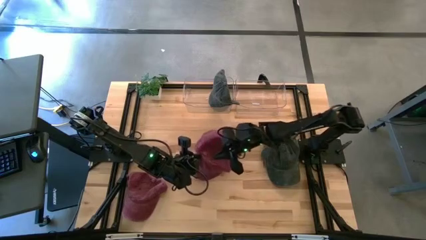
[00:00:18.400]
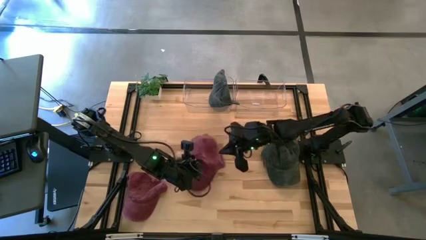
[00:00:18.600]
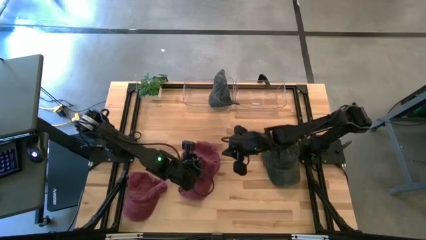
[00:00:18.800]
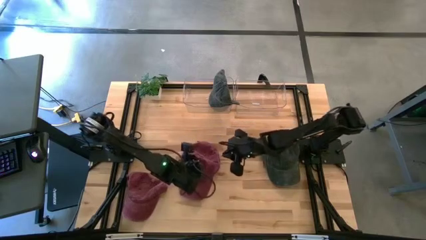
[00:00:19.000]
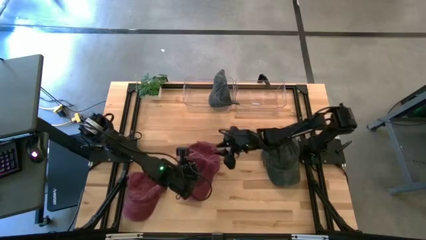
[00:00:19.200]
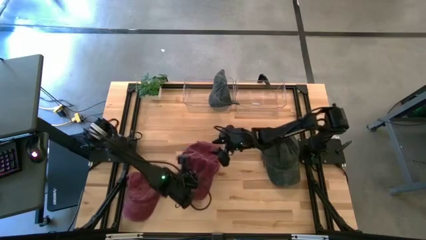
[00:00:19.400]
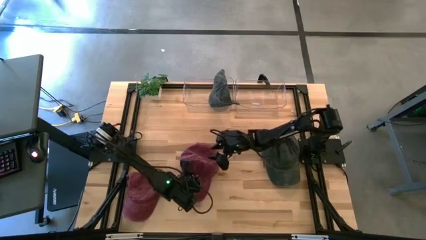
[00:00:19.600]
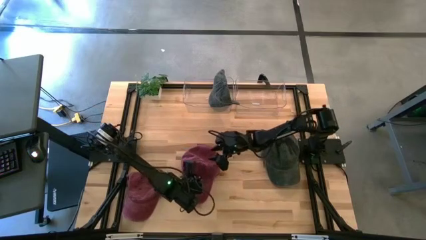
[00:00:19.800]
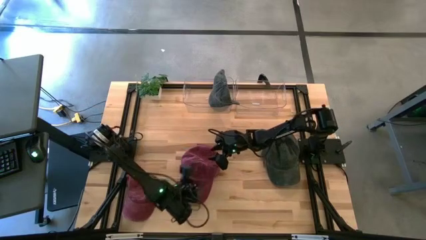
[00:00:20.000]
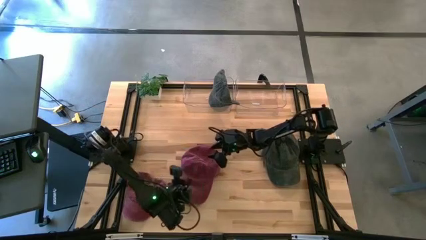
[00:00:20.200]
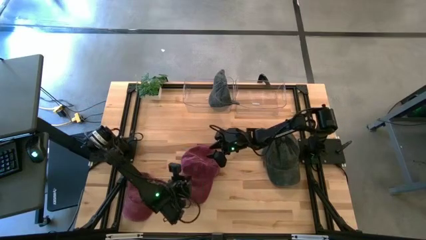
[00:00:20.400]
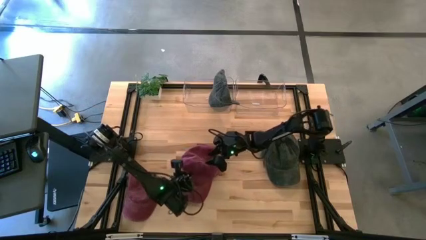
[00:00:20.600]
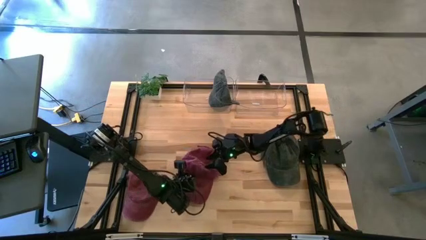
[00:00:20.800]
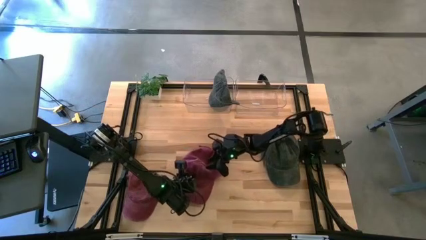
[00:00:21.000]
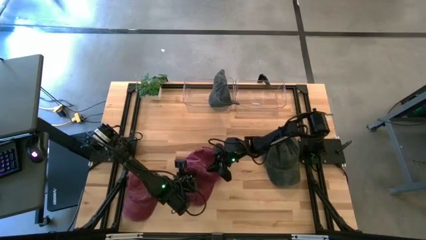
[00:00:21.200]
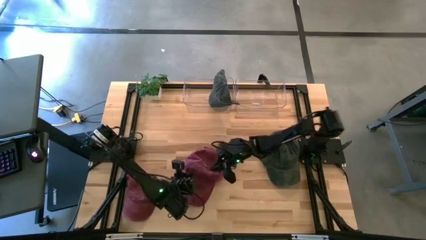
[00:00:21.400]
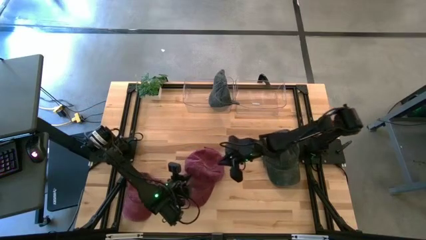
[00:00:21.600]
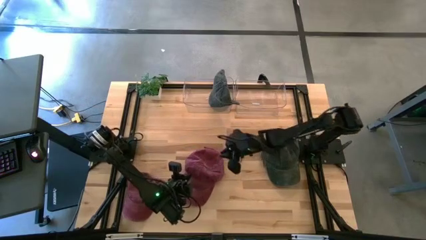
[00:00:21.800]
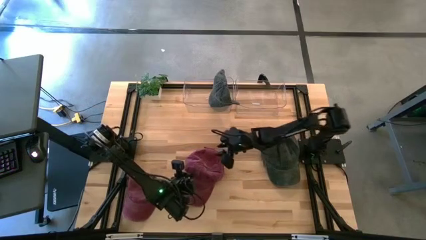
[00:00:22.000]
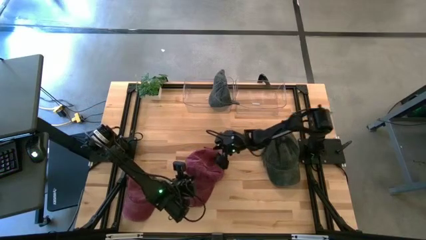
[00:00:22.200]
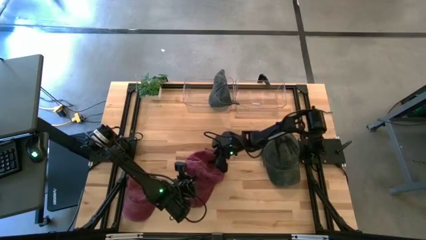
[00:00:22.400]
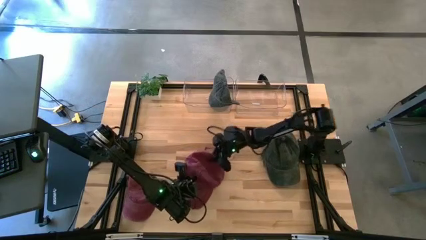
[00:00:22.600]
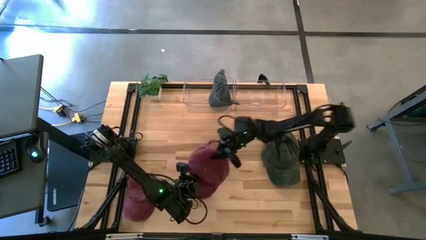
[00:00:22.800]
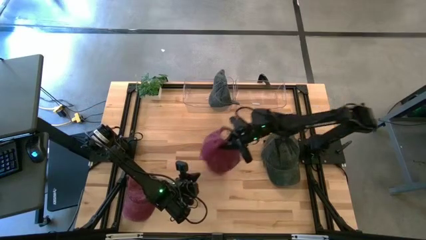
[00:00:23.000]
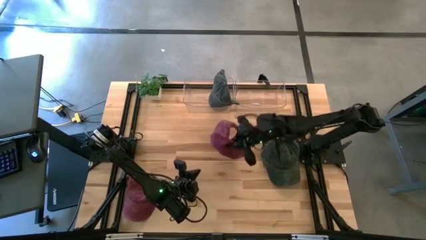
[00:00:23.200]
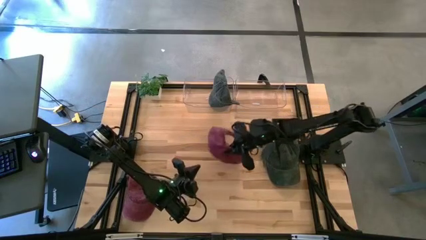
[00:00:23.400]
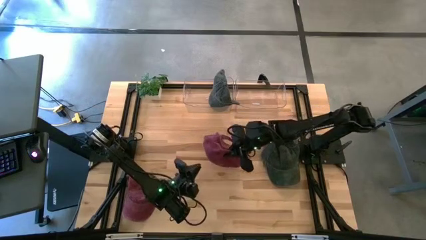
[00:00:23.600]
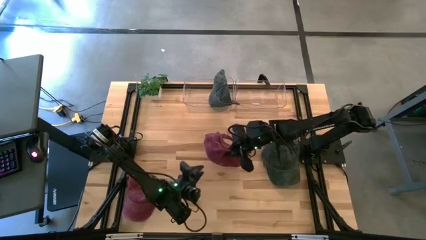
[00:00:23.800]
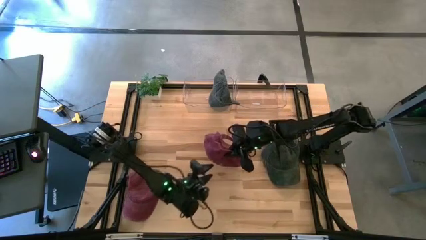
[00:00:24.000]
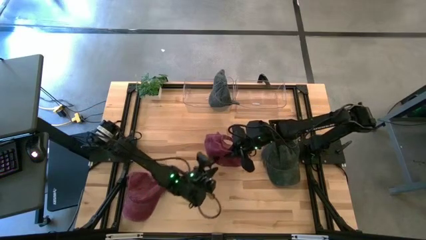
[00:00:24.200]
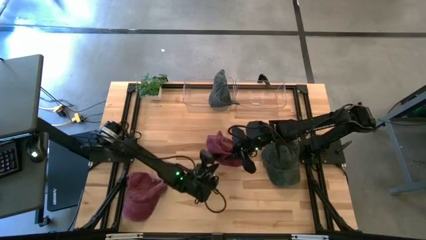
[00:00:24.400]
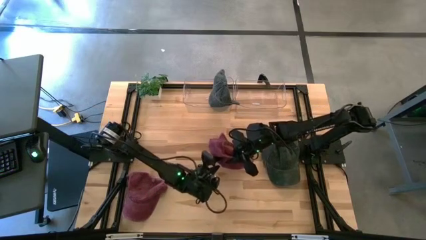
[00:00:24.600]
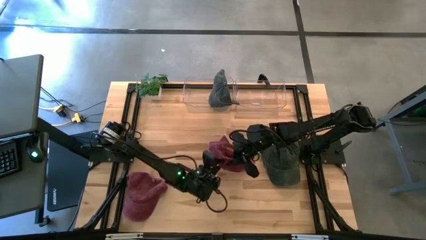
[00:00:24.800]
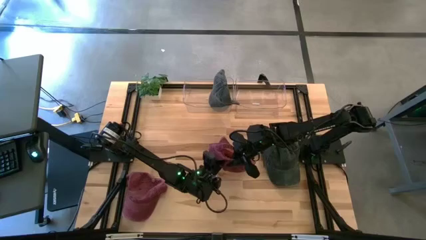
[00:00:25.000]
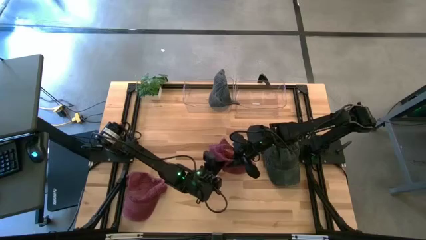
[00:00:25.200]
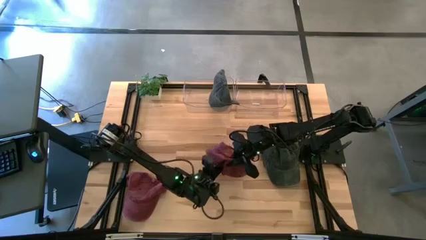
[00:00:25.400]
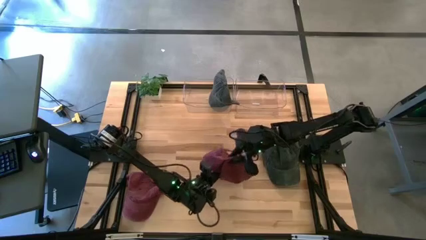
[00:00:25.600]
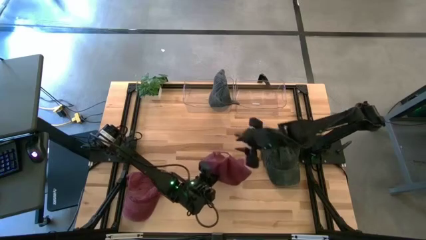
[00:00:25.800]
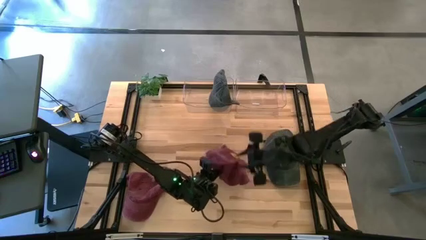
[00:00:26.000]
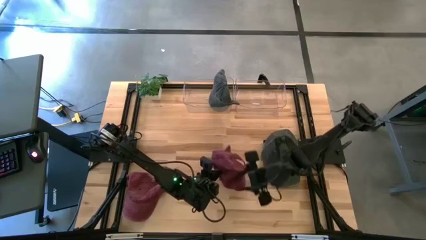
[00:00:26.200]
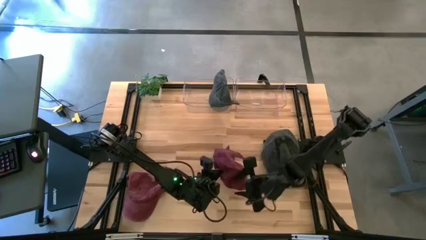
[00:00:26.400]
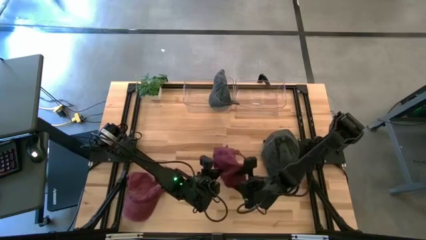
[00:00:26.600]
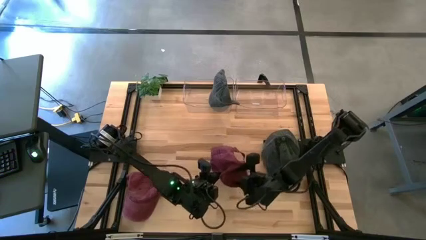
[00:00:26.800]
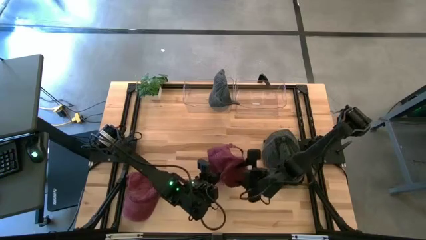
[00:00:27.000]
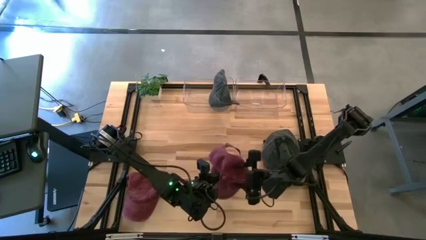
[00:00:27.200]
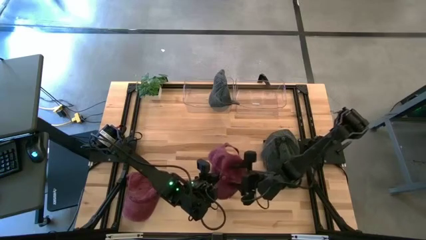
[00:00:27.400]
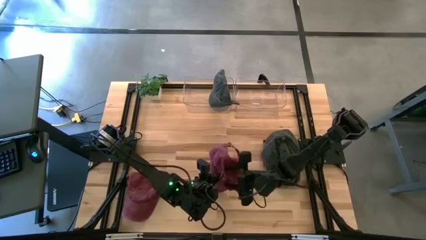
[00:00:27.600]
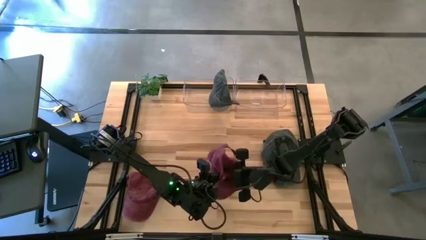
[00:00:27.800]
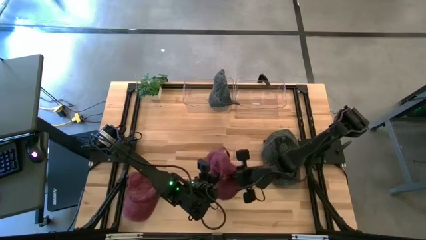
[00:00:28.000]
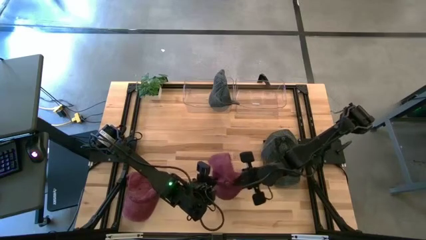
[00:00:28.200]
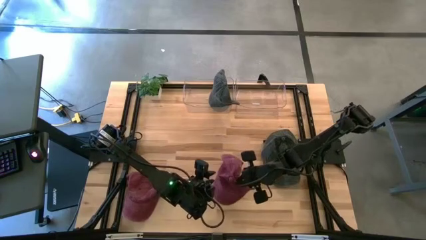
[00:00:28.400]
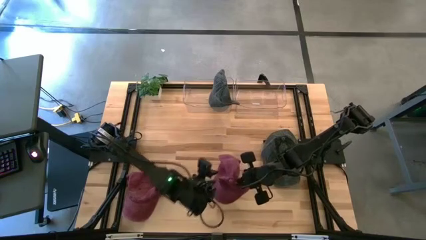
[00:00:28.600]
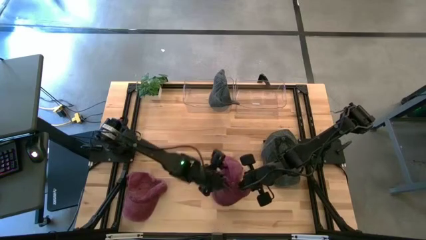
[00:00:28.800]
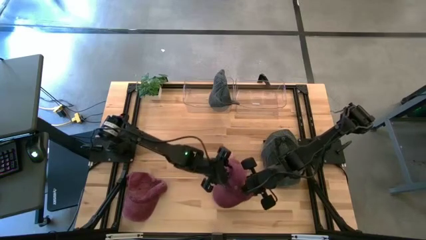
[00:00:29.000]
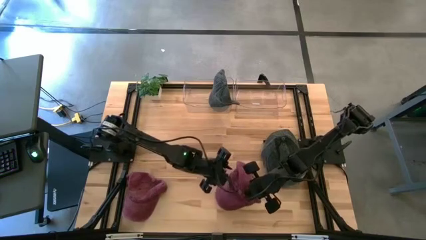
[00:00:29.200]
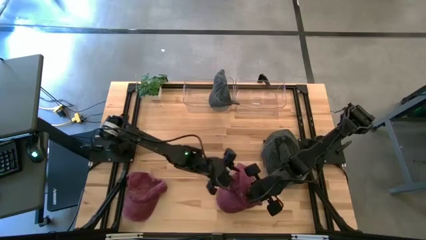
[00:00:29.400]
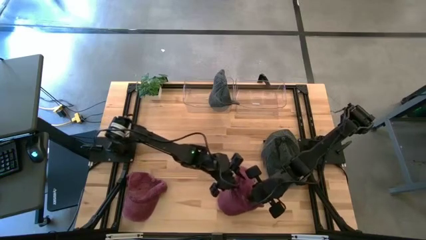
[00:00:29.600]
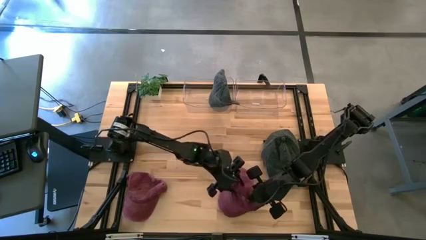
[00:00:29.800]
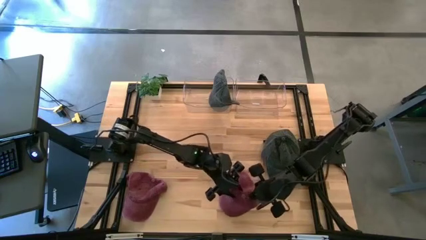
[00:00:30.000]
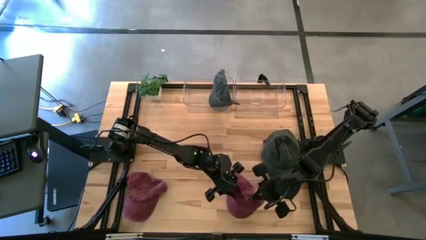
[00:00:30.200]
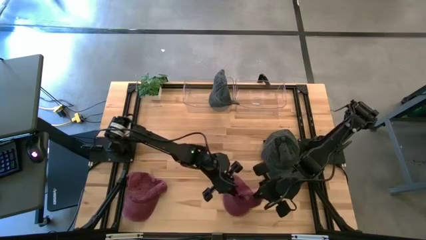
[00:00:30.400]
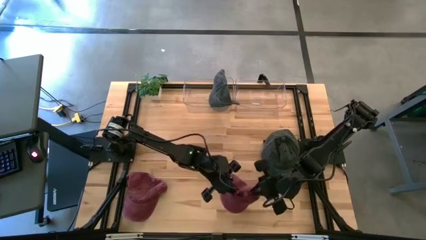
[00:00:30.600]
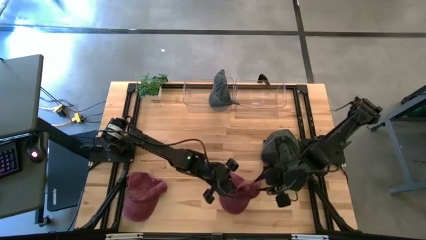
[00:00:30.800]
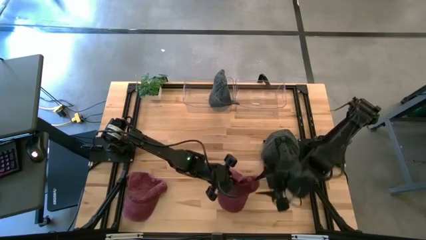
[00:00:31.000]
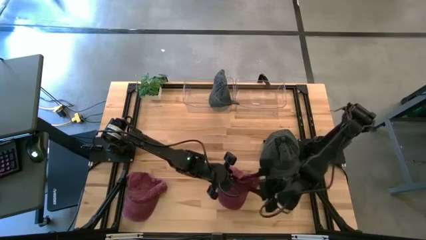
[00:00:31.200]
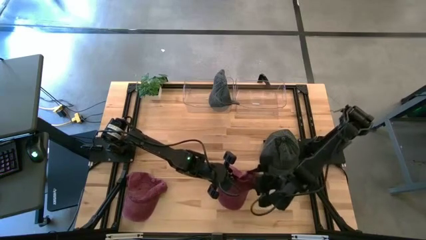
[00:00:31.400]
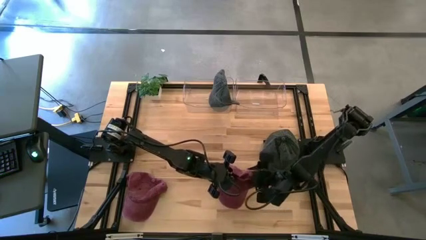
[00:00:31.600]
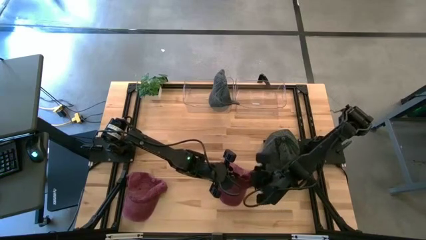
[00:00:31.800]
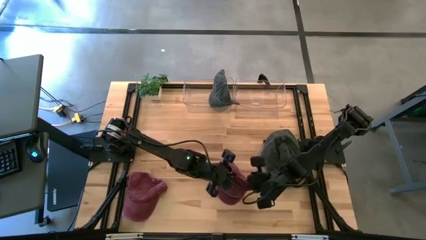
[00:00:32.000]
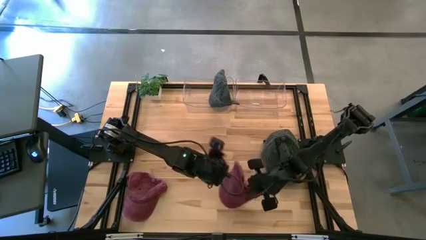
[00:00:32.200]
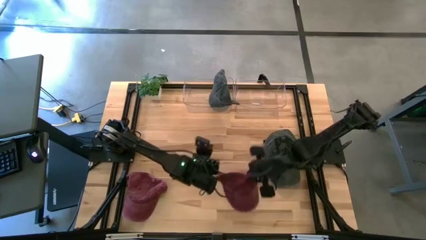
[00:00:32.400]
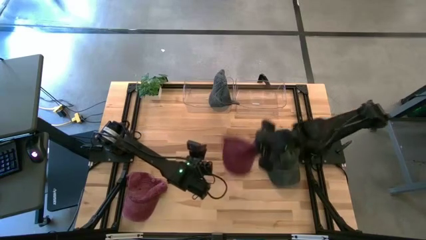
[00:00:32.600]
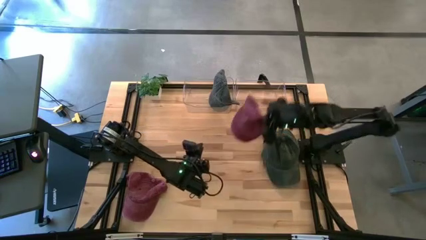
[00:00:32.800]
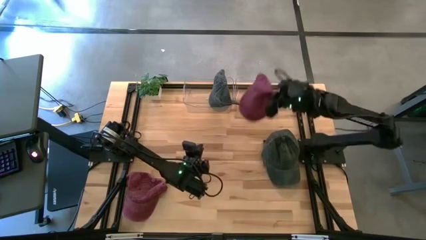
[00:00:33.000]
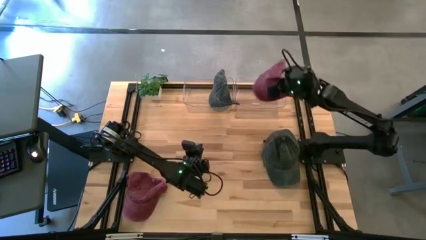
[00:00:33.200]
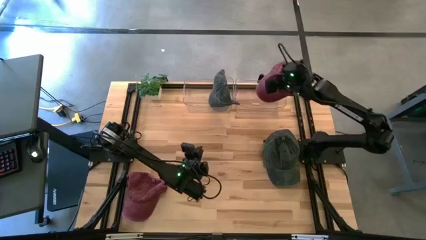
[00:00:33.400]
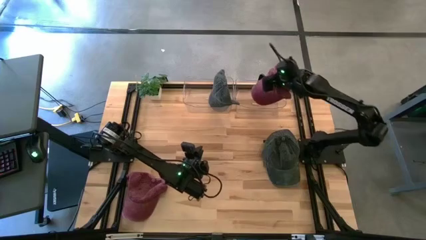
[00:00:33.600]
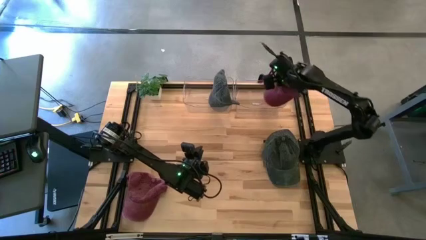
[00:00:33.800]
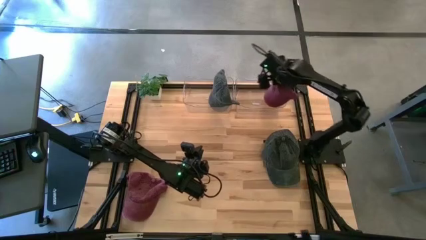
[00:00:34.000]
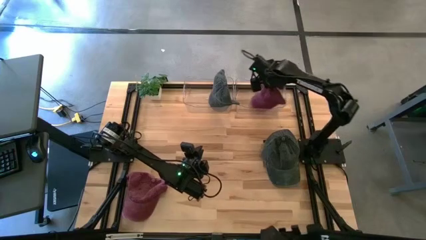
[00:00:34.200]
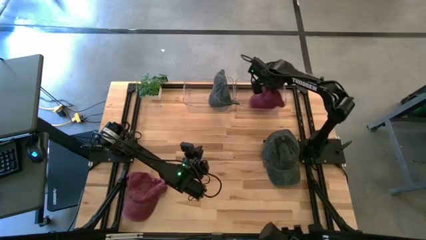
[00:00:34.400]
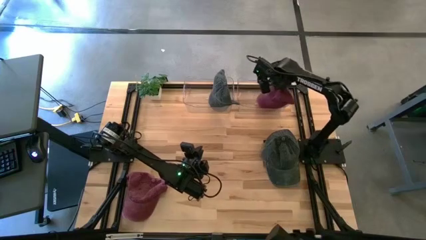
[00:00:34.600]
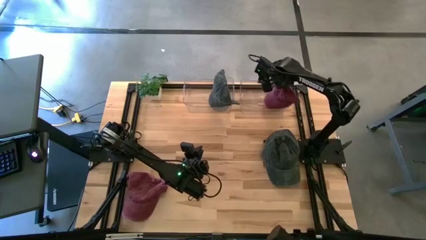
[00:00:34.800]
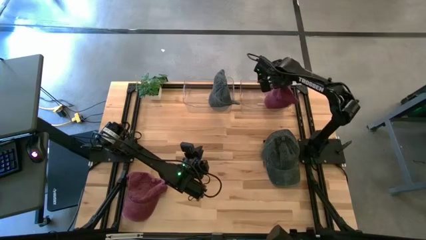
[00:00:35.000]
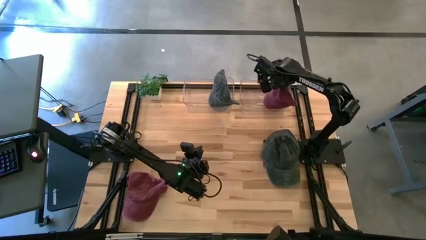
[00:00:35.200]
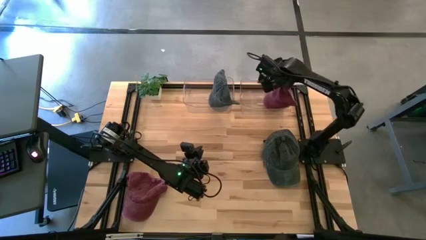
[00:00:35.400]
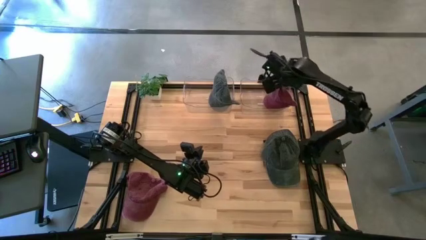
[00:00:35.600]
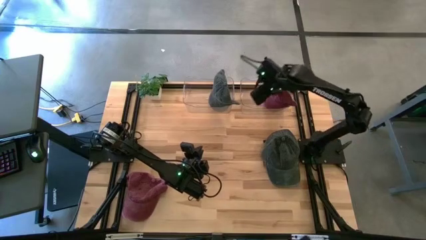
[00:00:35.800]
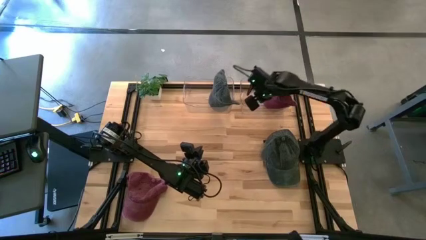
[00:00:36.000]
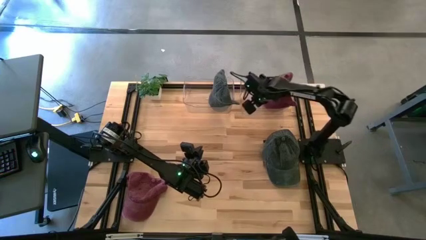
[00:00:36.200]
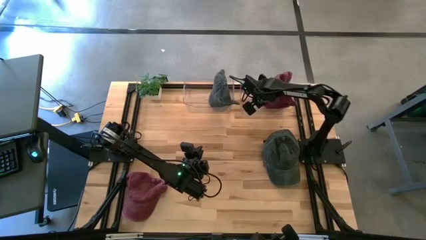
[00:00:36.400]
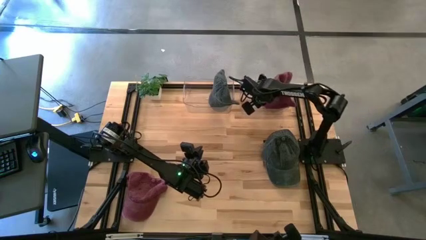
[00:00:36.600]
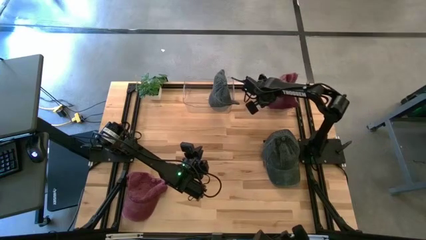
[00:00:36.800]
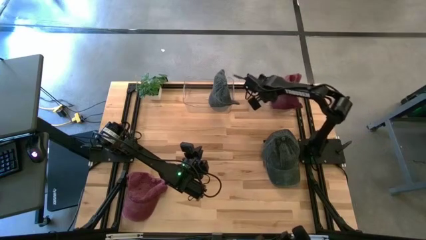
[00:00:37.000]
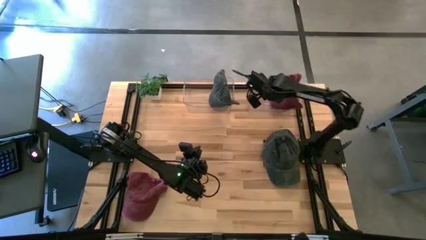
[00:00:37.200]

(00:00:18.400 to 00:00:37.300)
Task: Pick & Place hat
Put the right red cap into the right transparent bin
